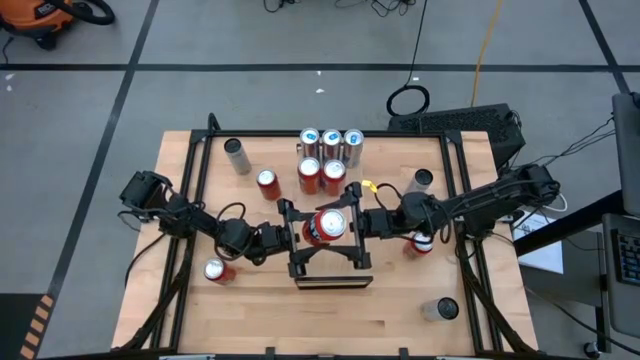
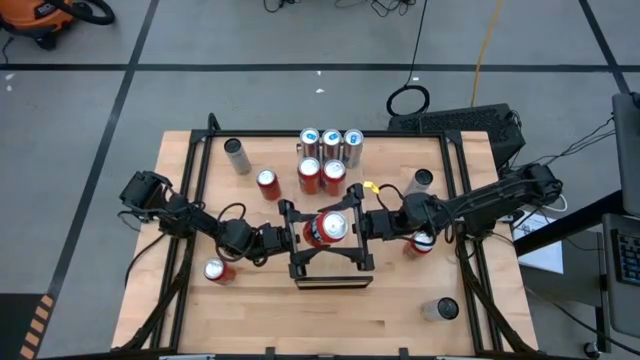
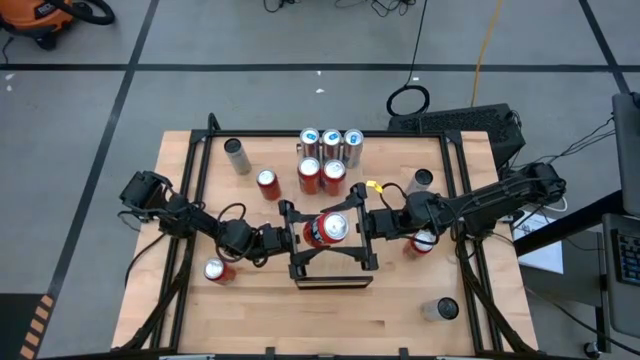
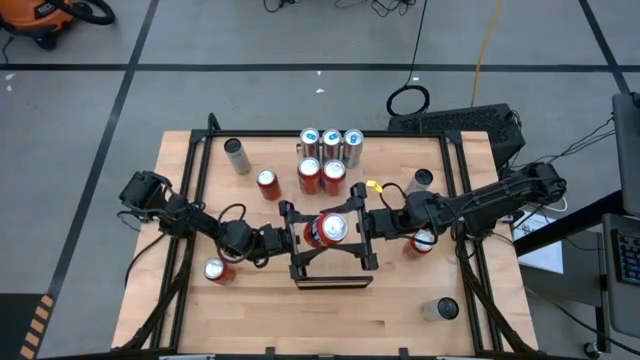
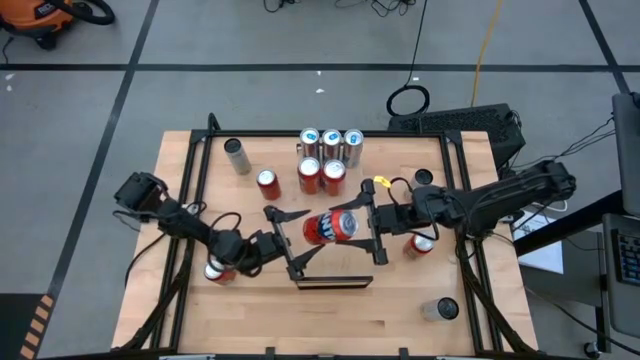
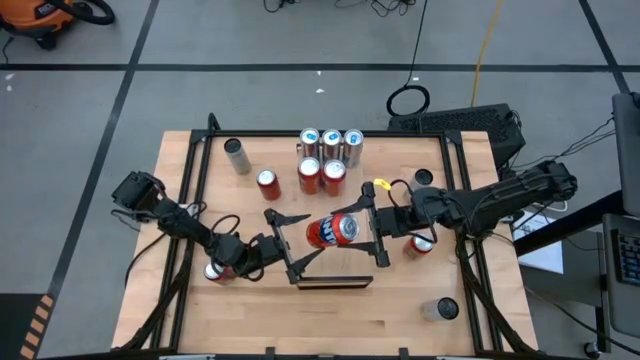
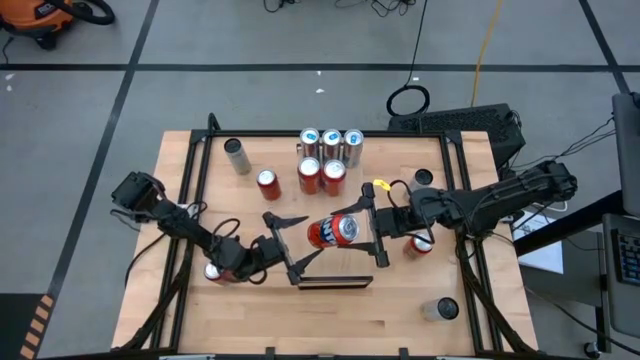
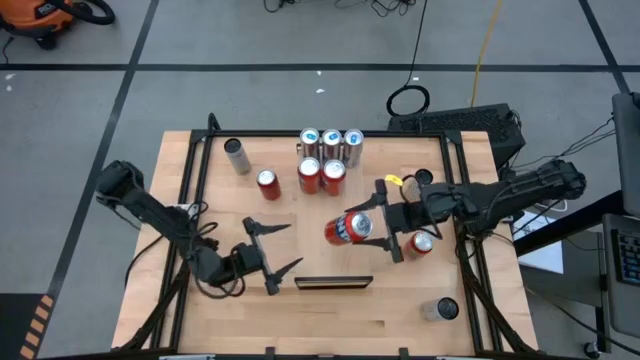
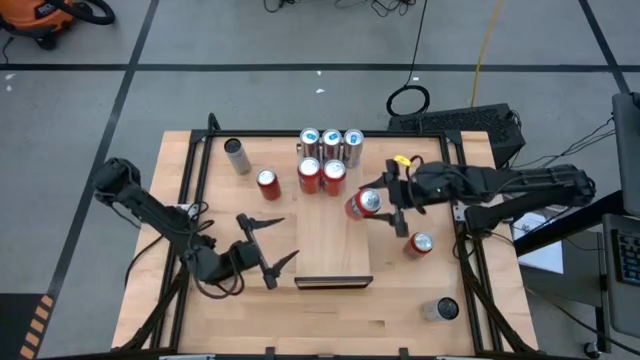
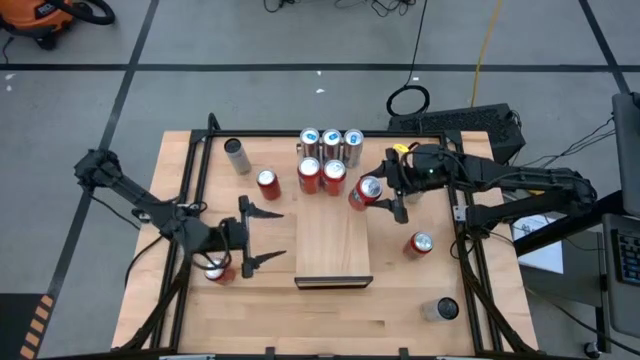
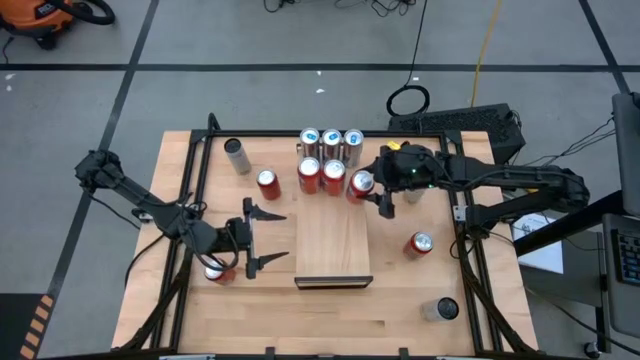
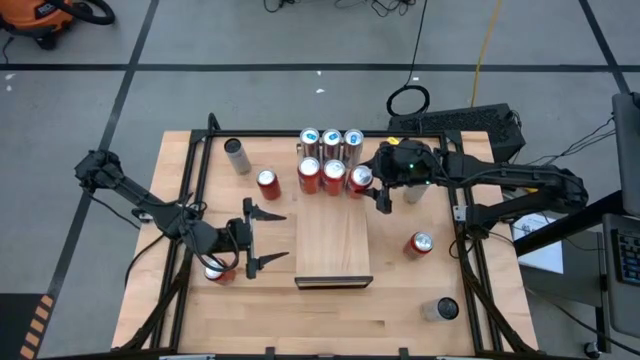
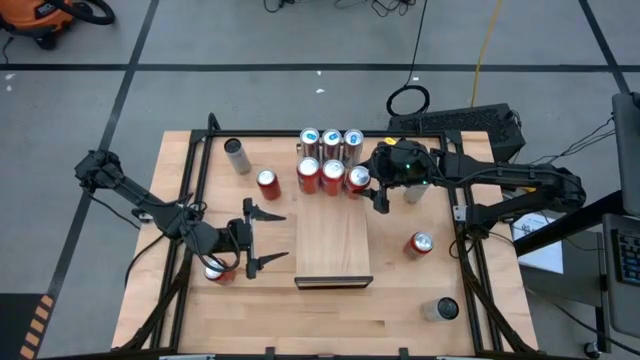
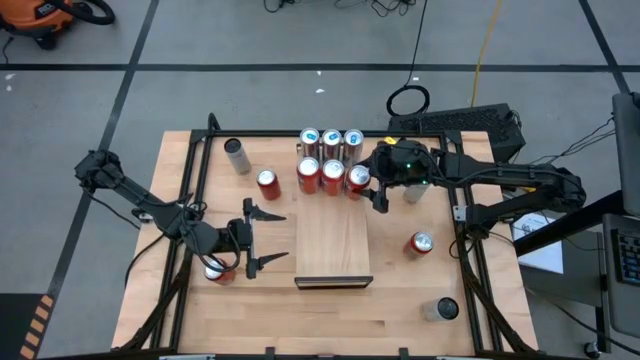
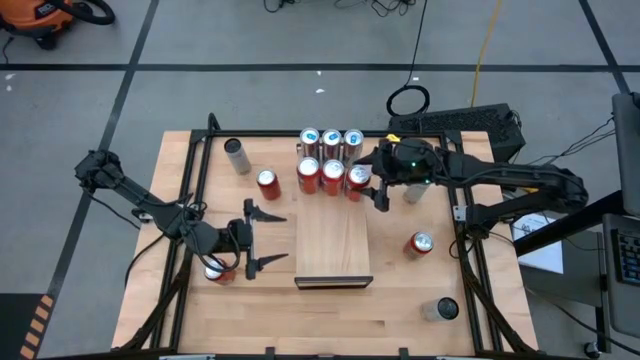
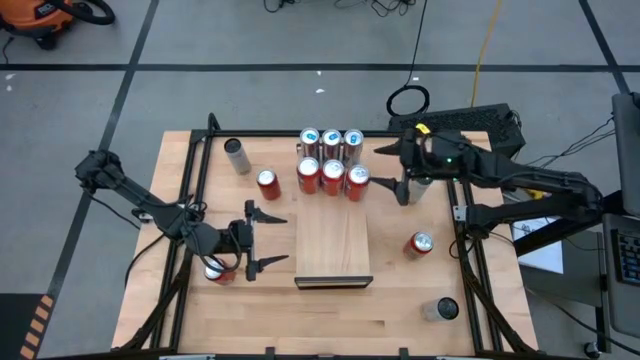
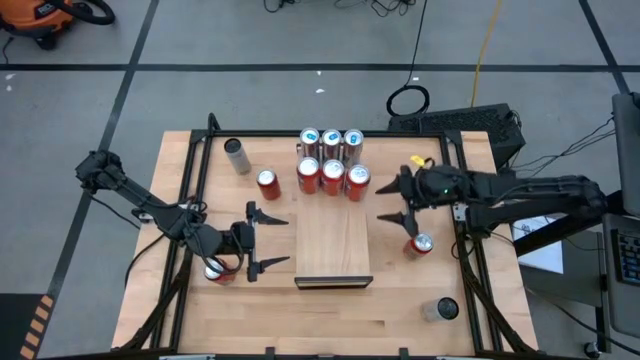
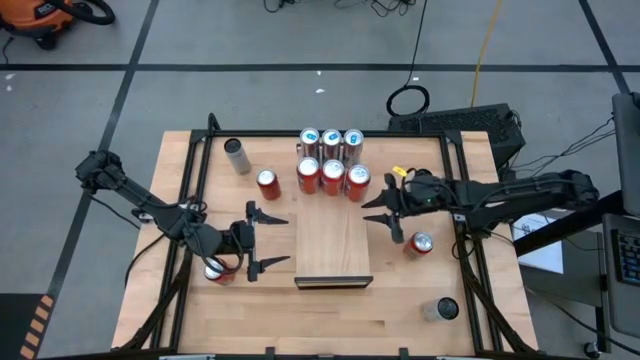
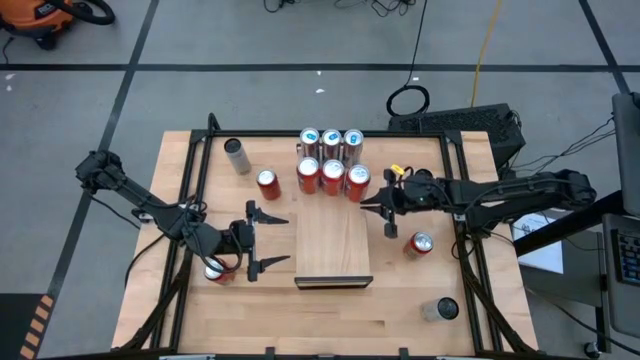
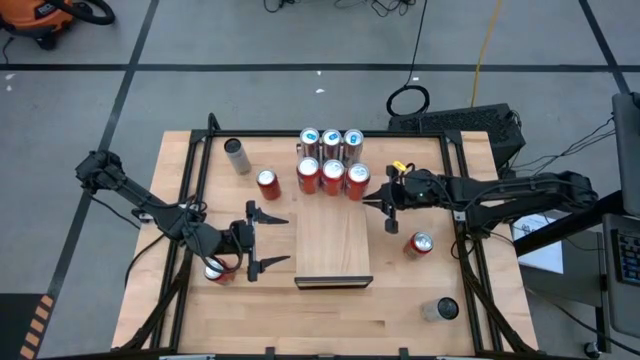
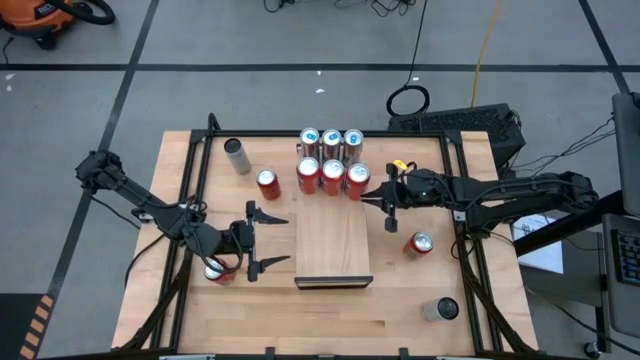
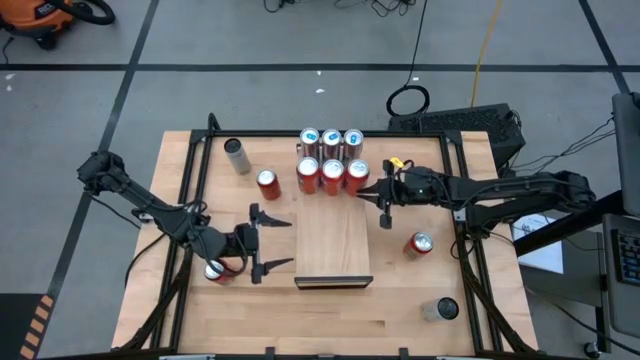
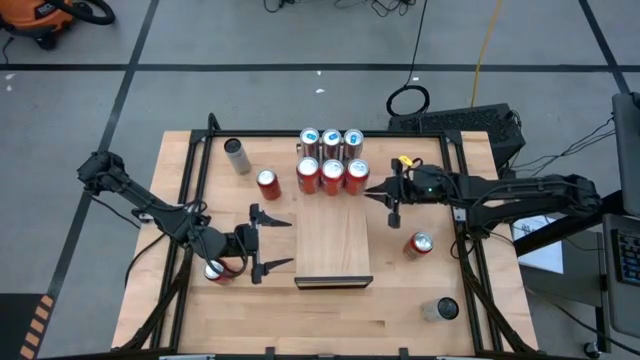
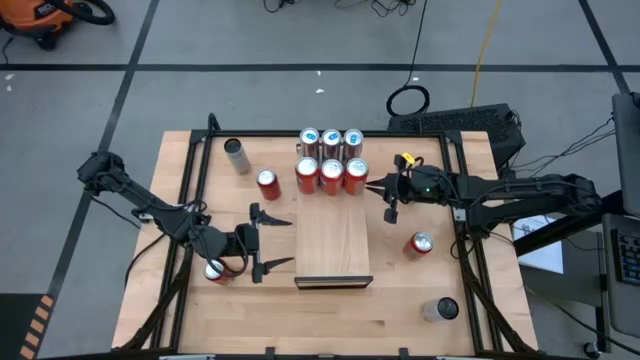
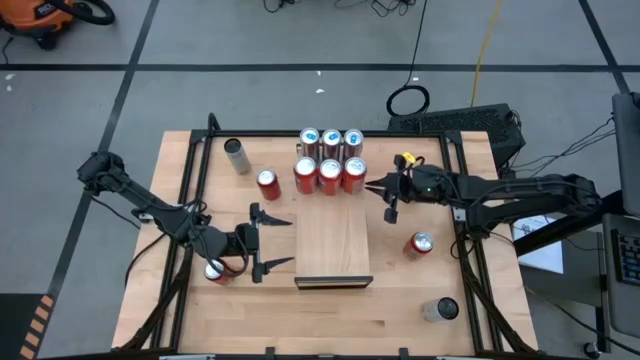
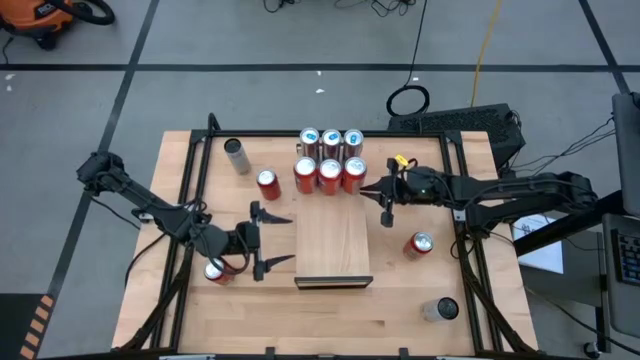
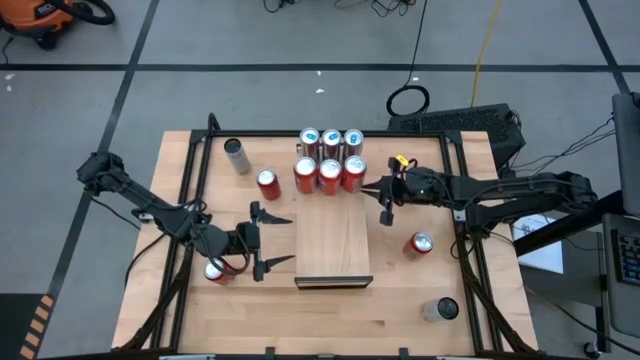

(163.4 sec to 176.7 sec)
Task: Place canned beverage on shelf
Put the red soda can on the shelf aligned with the other red soda can

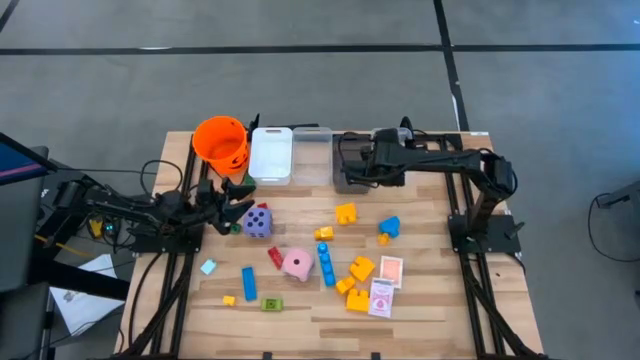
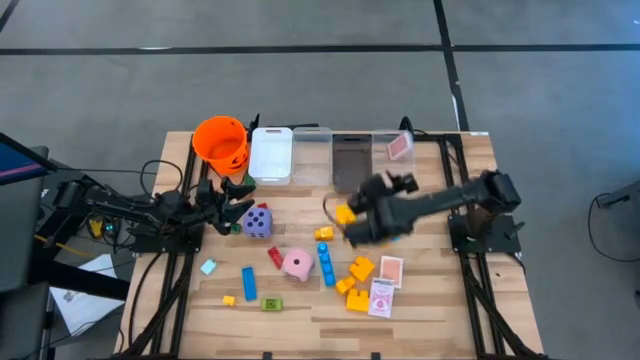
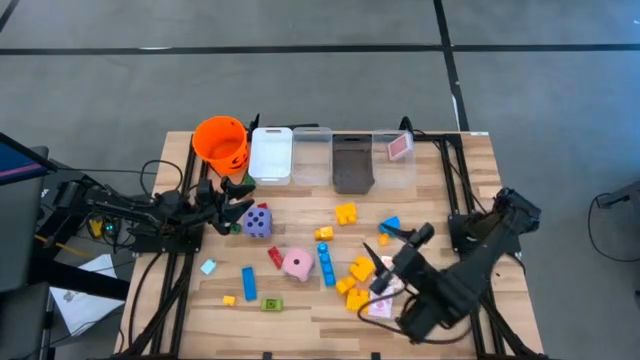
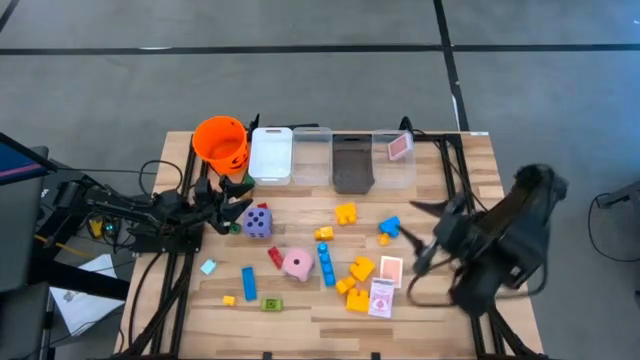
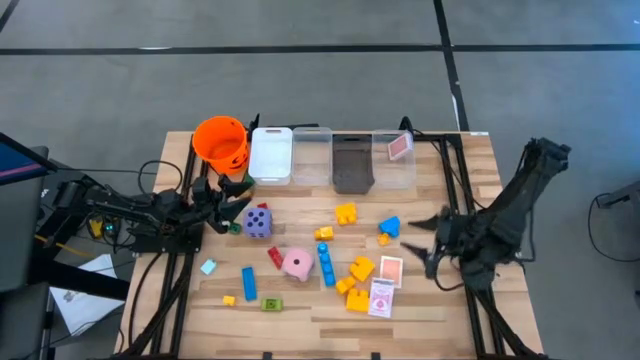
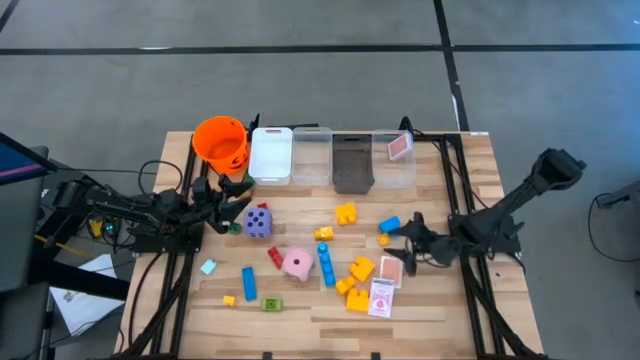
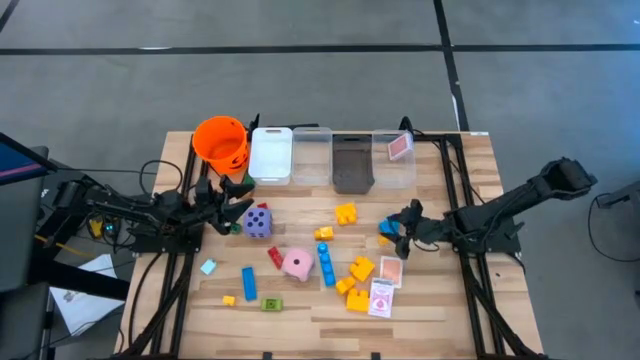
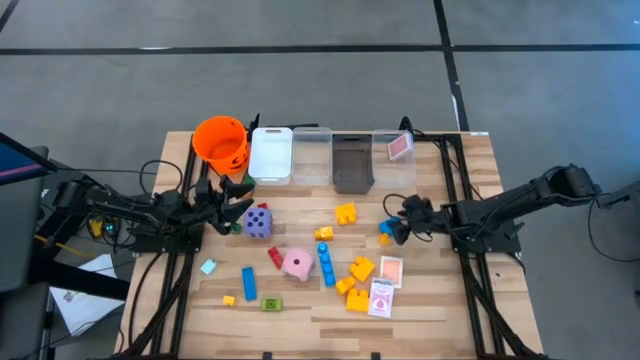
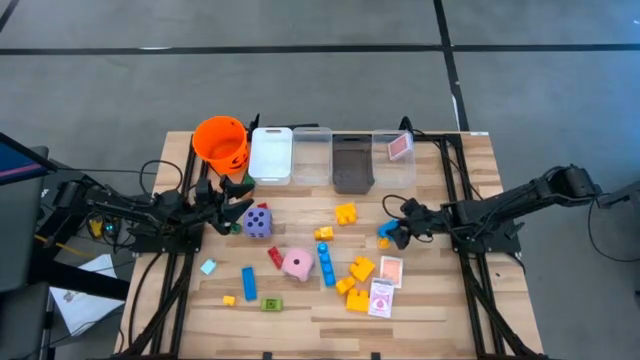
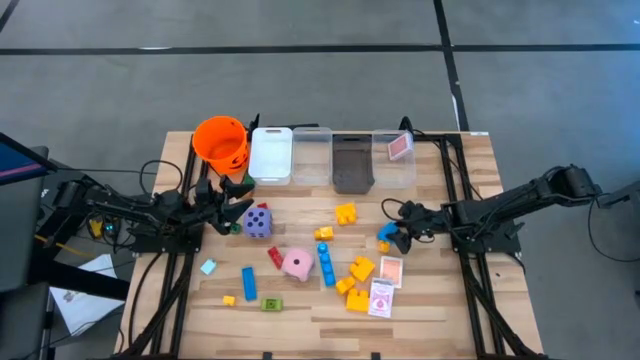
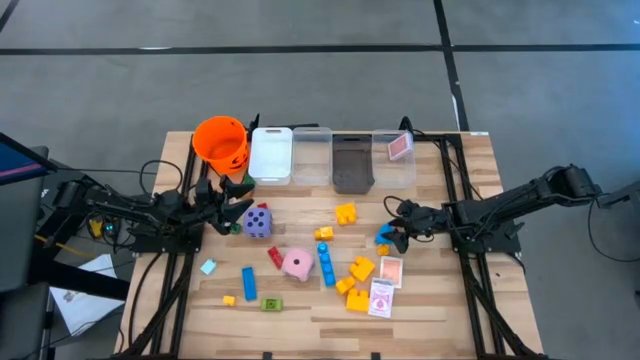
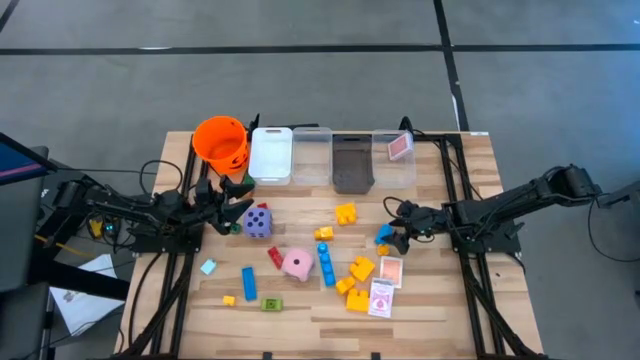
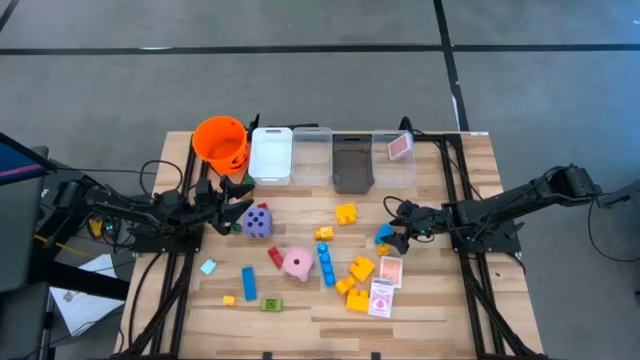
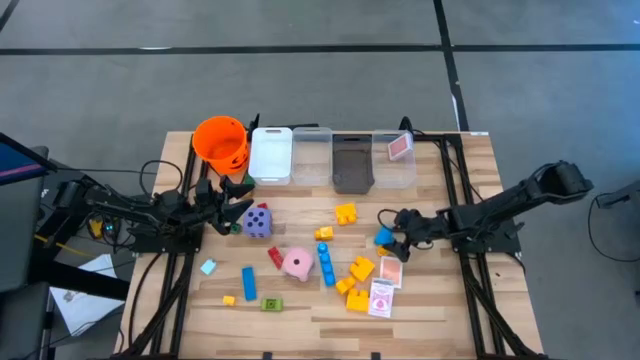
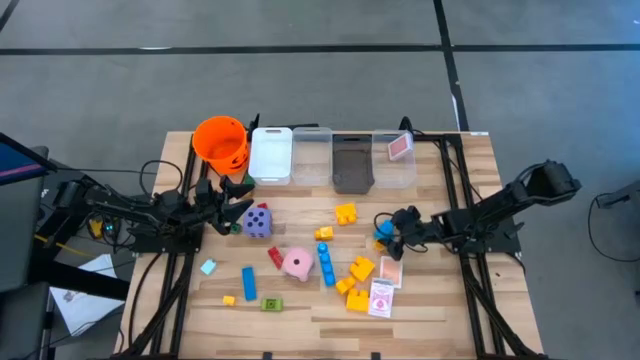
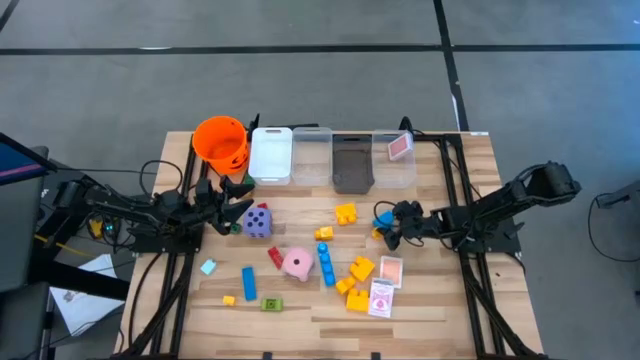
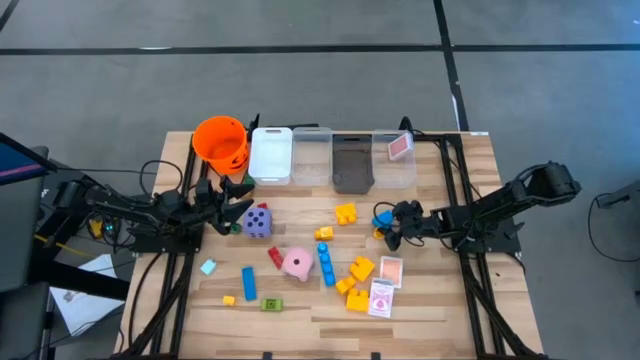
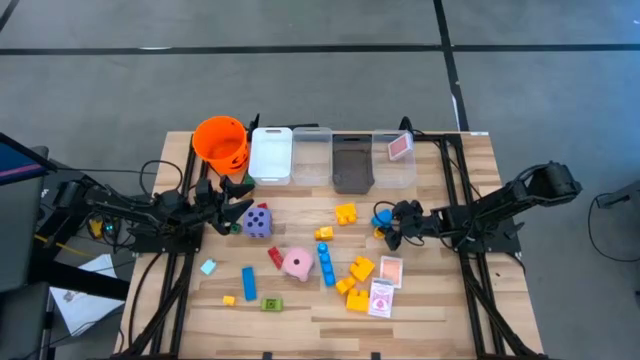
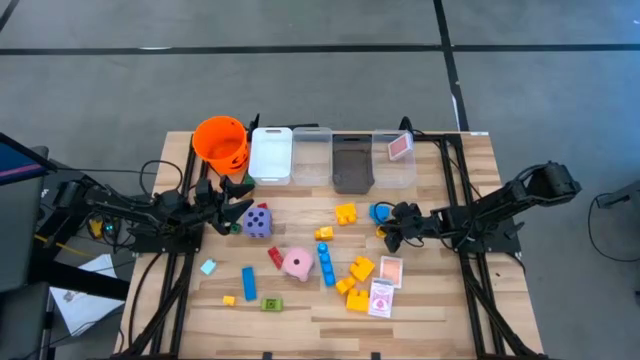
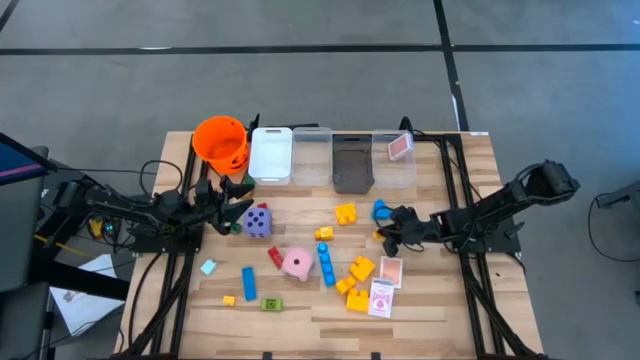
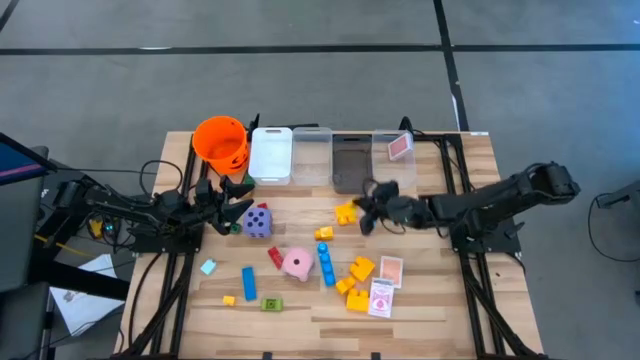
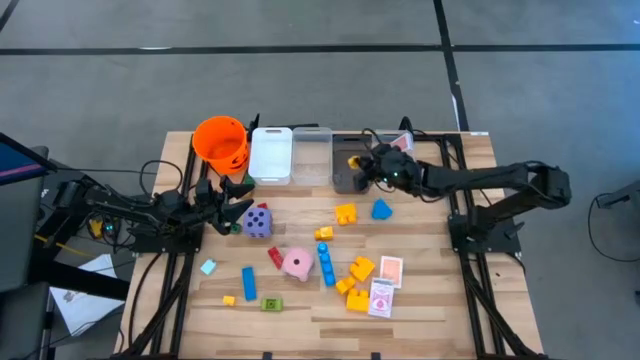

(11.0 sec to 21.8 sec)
Task: Pick & Place Toys
Put the yellow game piece into the black bin
